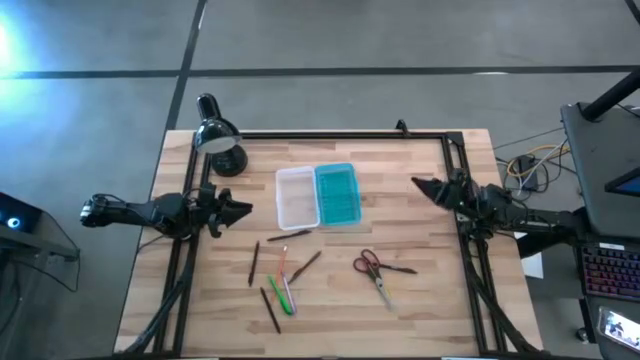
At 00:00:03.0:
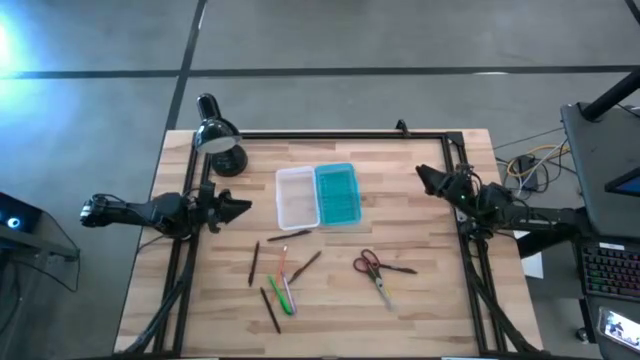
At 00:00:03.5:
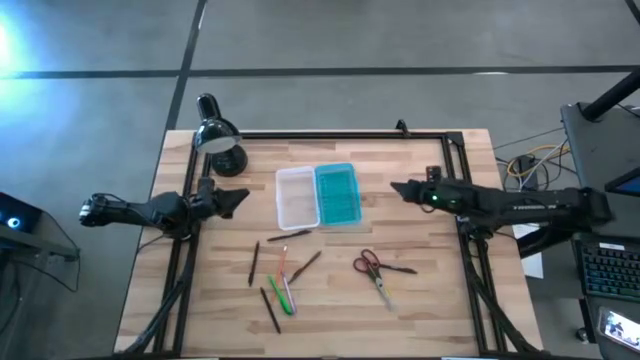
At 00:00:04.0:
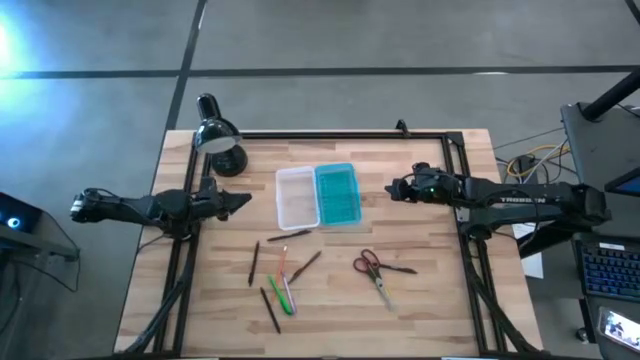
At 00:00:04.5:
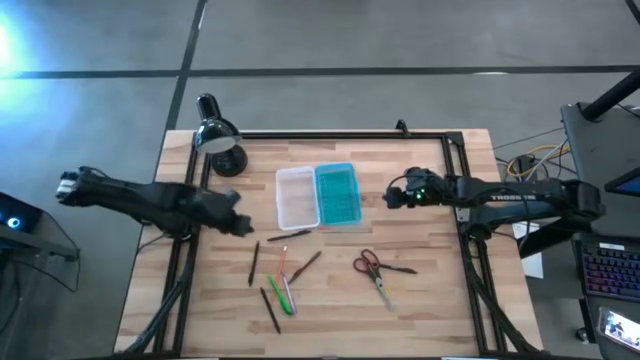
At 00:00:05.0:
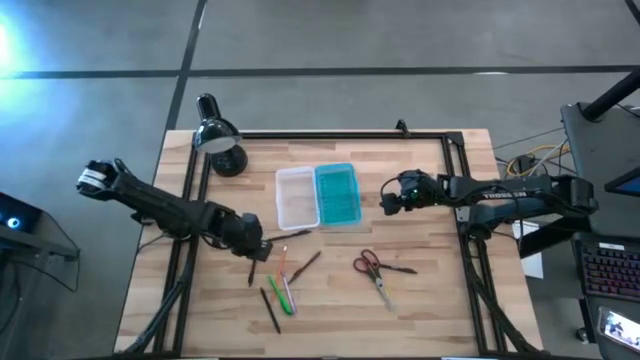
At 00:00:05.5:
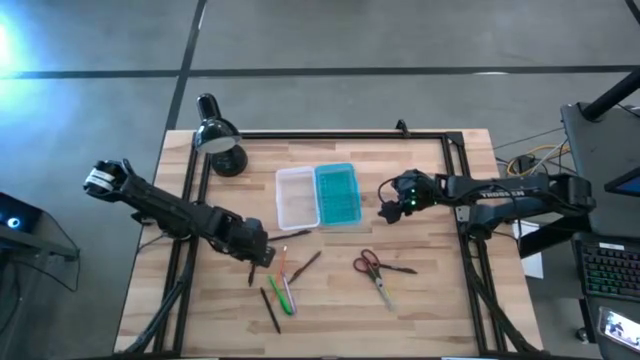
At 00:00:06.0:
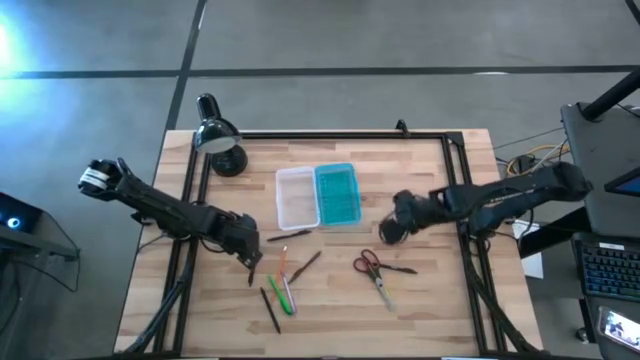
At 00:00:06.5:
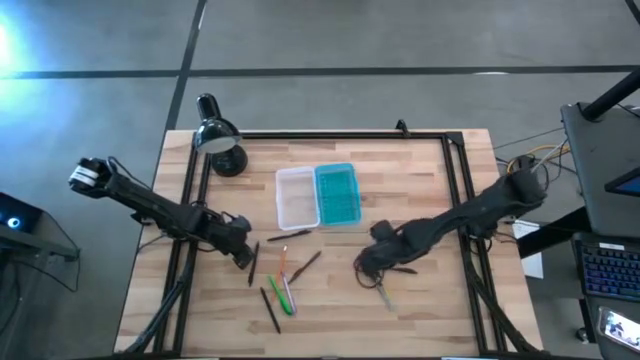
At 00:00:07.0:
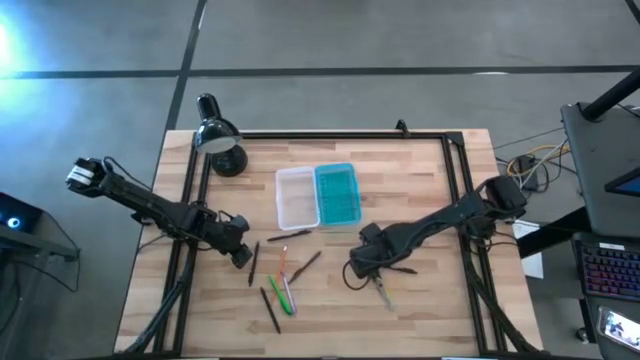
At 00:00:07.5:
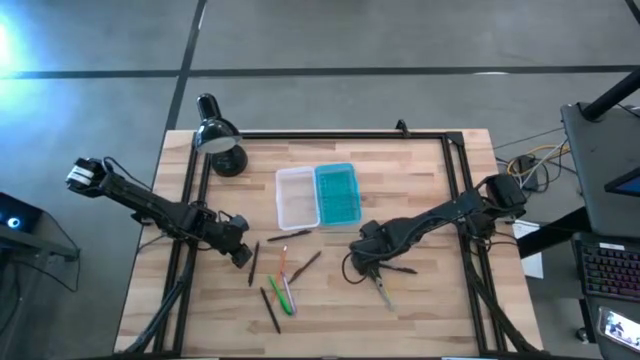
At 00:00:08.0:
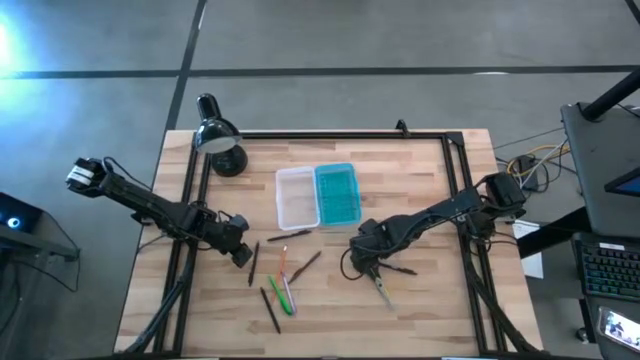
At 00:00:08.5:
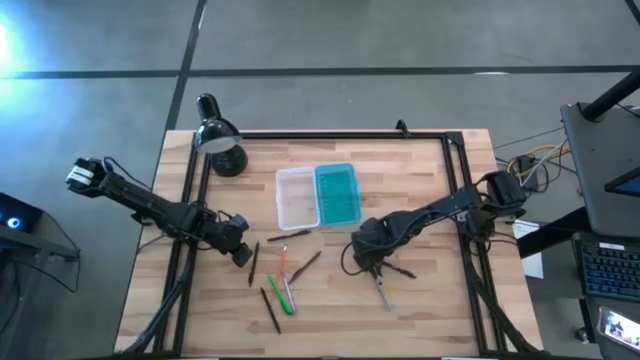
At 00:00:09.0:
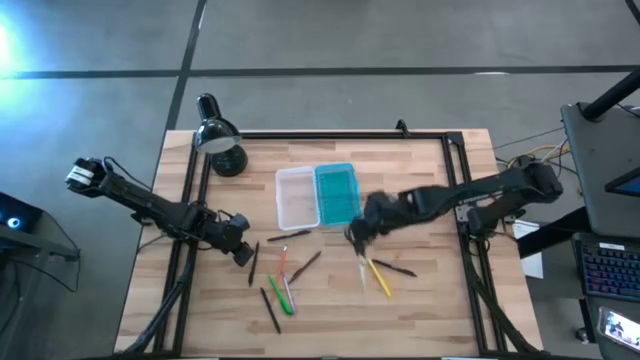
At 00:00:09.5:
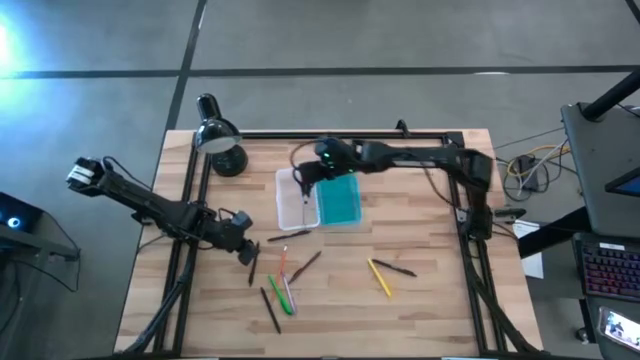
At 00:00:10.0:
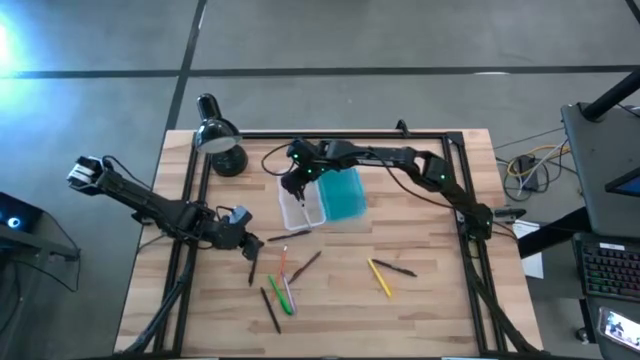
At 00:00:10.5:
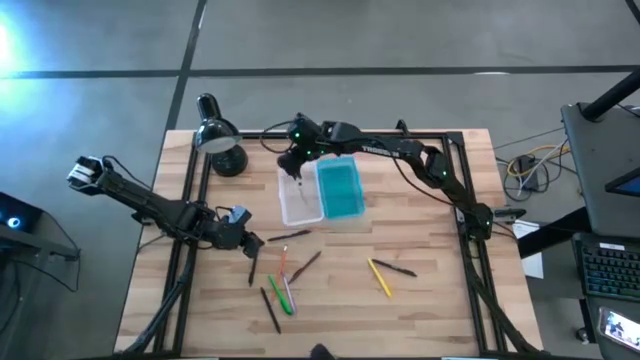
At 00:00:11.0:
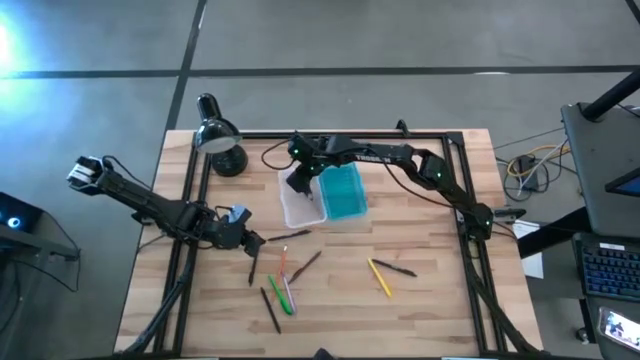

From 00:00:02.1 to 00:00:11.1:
Task: Pick & place school supplies into a supply box
Put the scissors into the supply box

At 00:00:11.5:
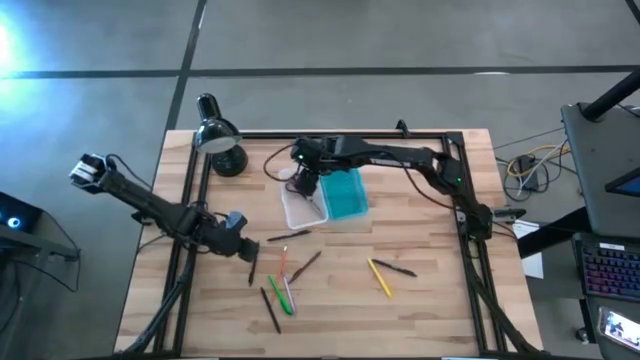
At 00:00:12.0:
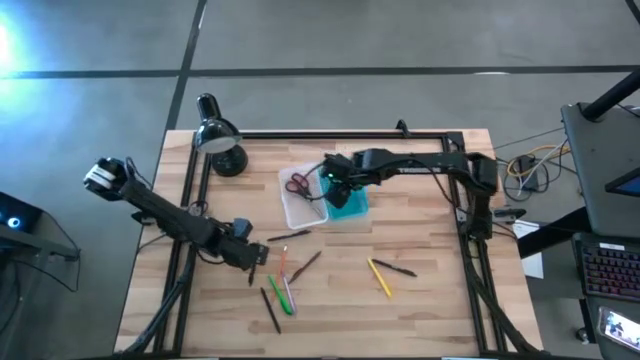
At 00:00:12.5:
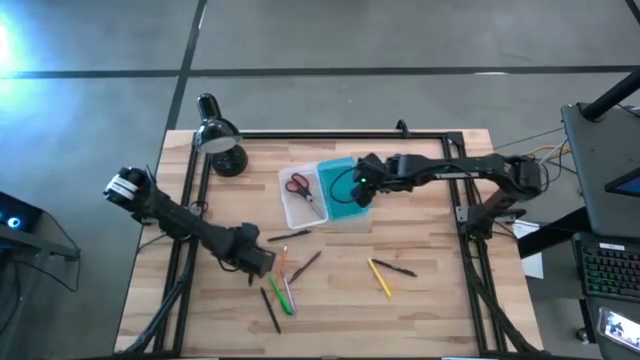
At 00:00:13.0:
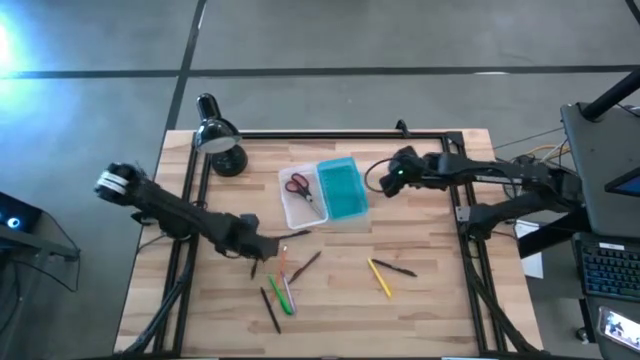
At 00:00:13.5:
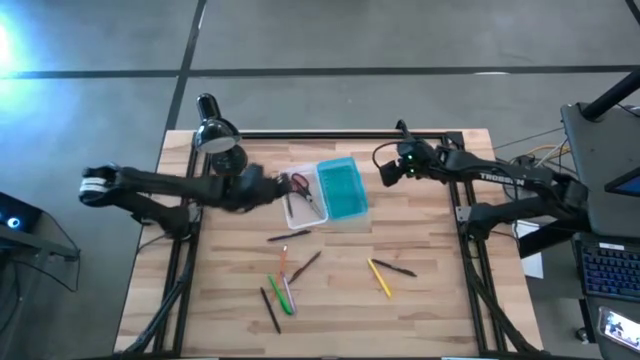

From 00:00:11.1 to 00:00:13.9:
Put the left black pen into the supply box

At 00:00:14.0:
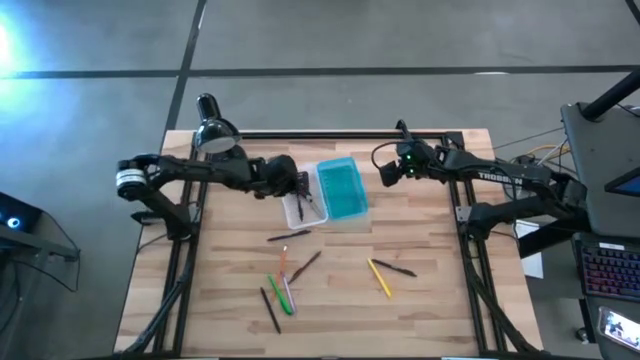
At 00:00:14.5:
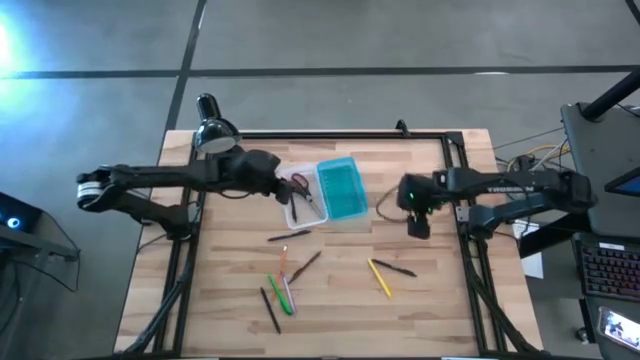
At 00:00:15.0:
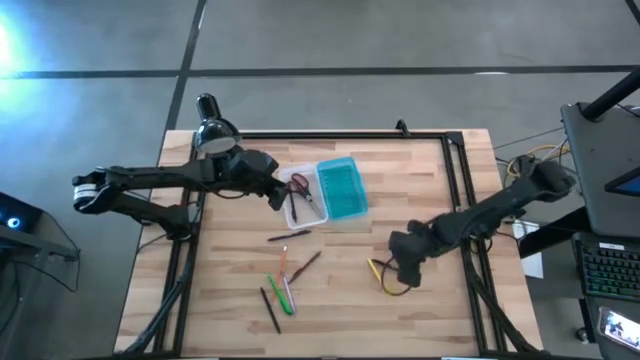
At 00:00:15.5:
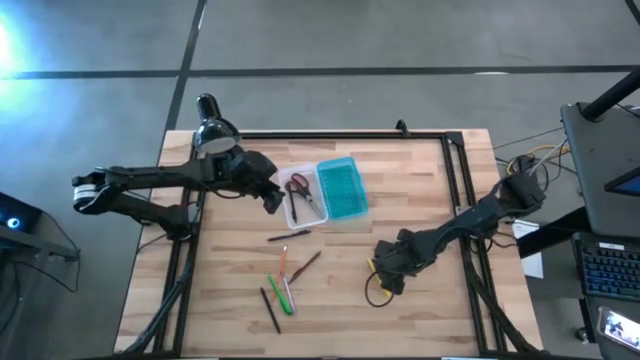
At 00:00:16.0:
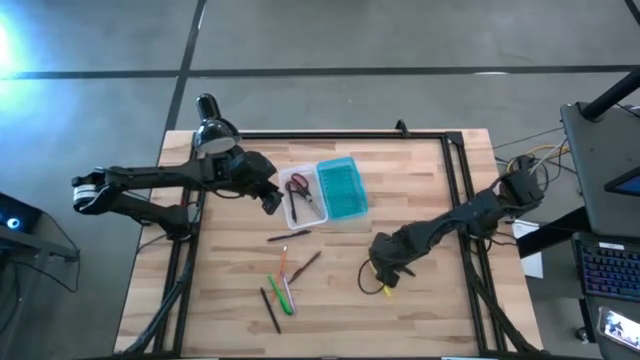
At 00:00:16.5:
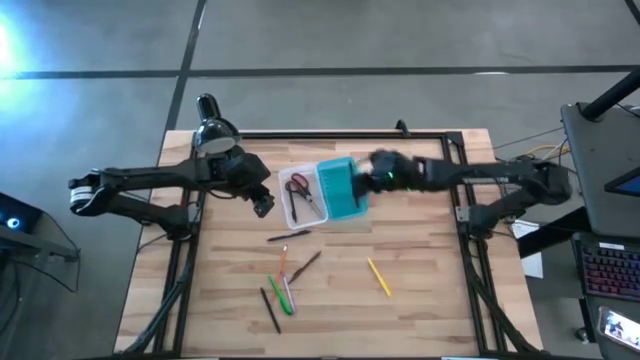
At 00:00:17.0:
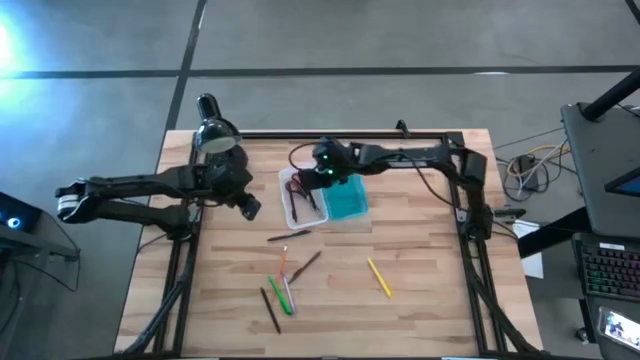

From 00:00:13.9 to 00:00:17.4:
Put the right black pen into the supply box

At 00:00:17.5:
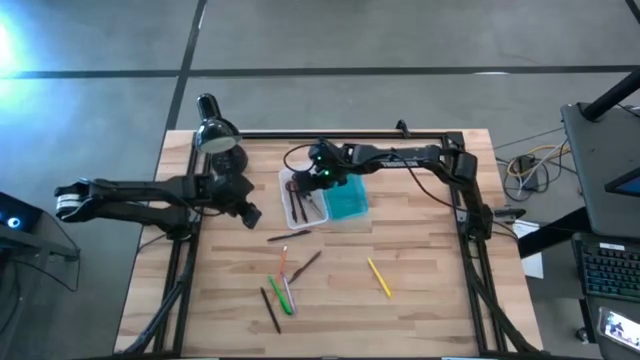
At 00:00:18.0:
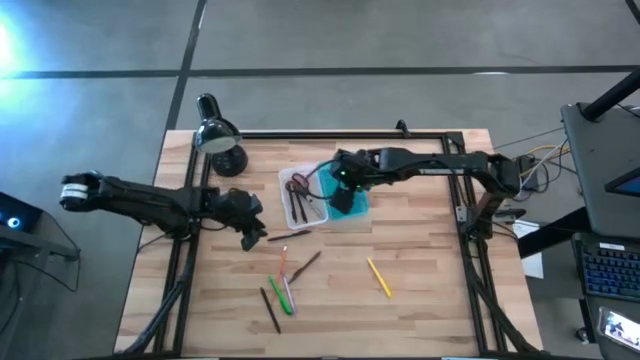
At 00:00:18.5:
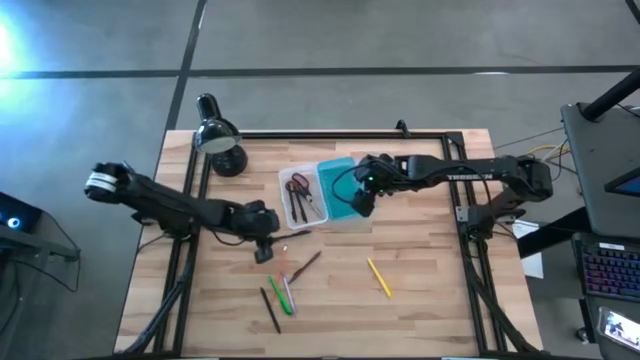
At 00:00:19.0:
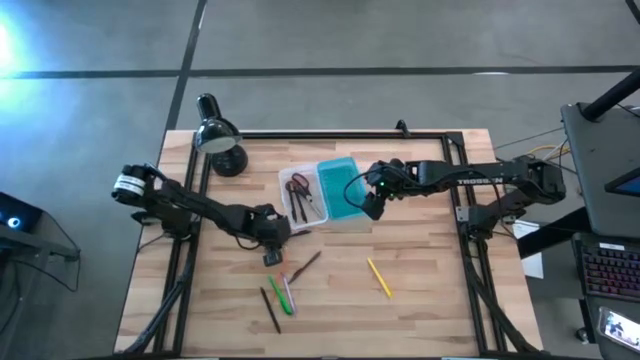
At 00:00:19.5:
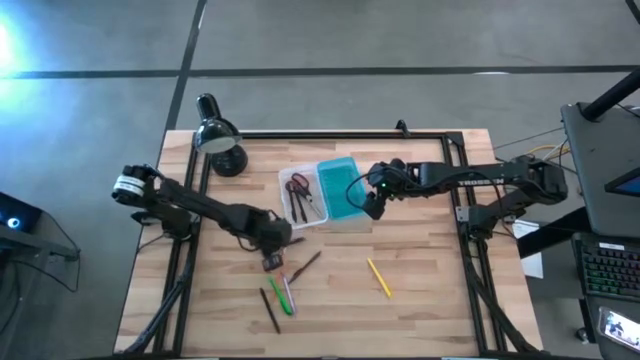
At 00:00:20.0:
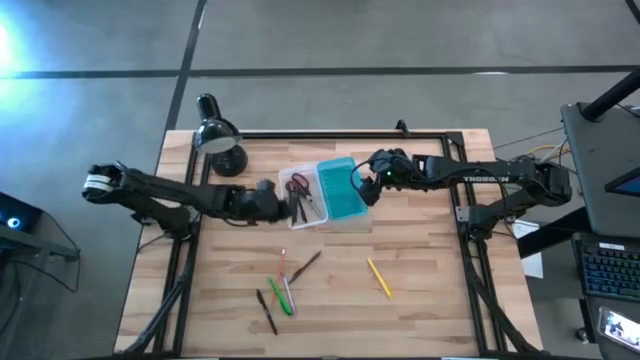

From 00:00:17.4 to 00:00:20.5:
Put the top black pen into the supply box

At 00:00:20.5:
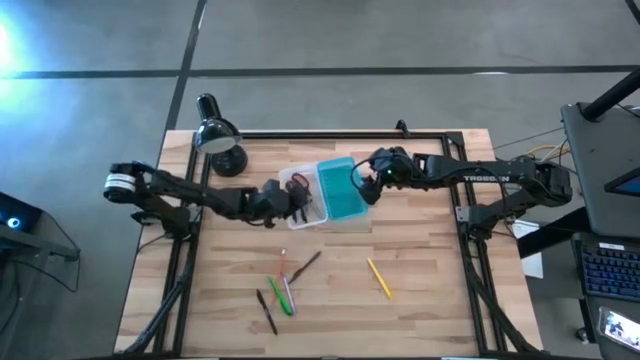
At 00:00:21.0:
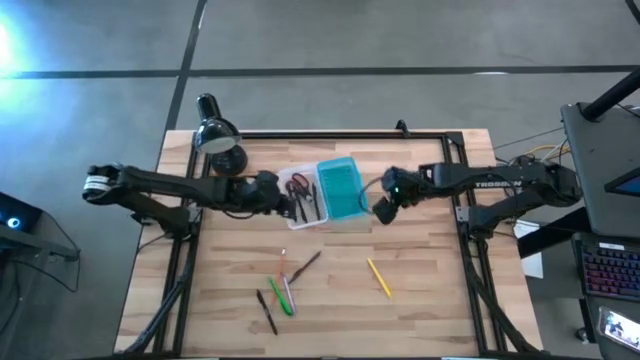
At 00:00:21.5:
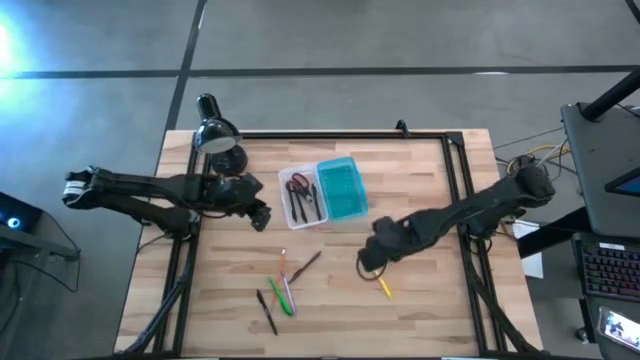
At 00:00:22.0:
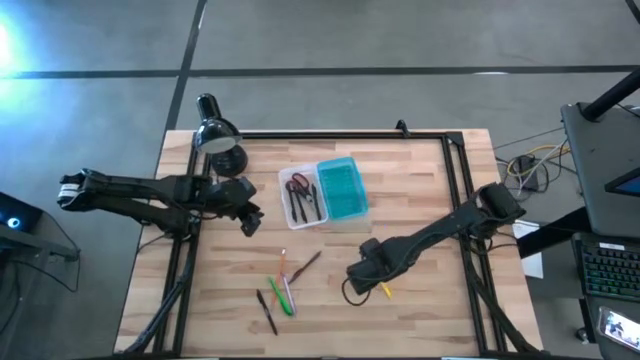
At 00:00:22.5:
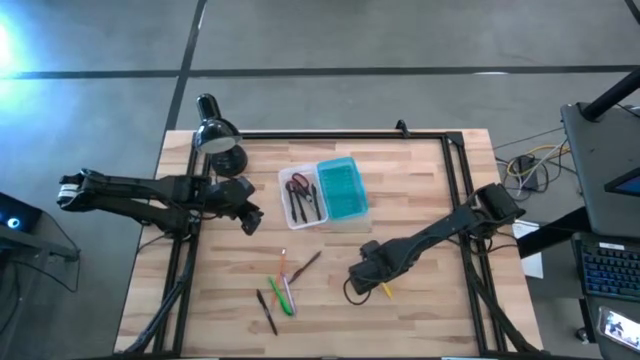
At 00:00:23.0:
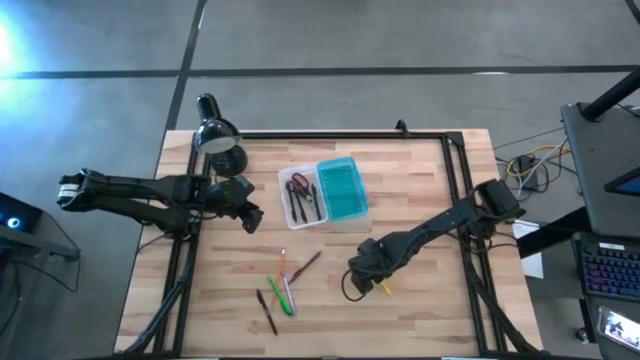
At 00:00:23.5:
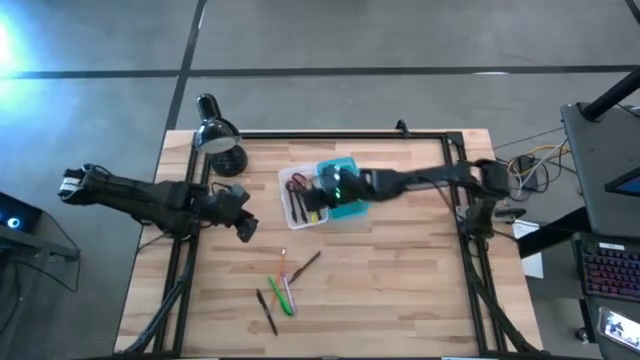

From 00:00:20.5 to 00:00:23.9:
Put the yellow pen into the supply box
